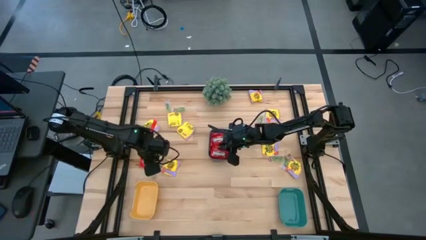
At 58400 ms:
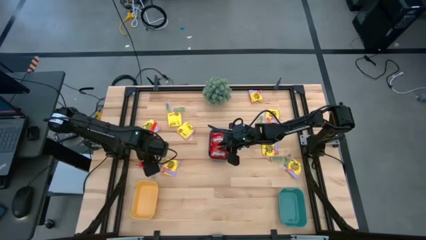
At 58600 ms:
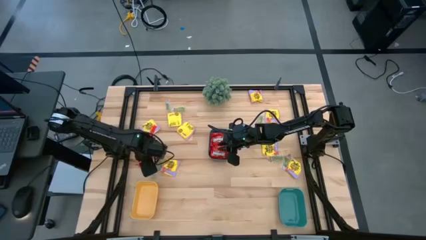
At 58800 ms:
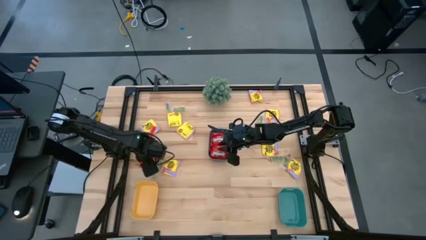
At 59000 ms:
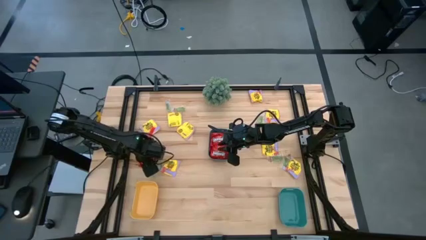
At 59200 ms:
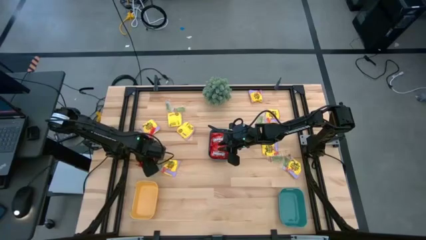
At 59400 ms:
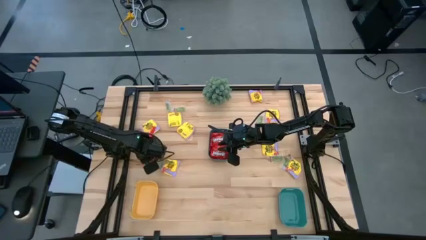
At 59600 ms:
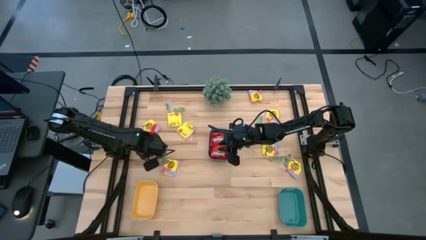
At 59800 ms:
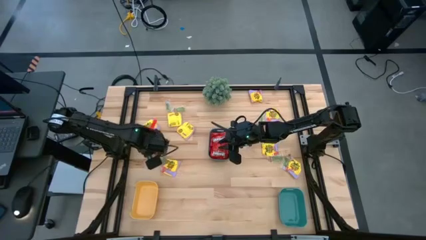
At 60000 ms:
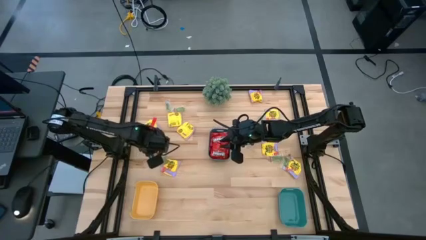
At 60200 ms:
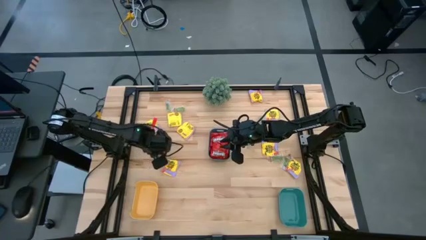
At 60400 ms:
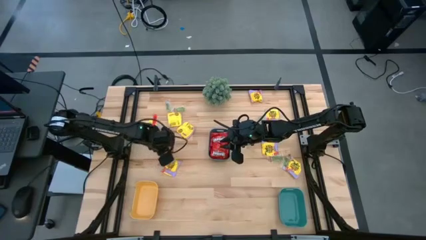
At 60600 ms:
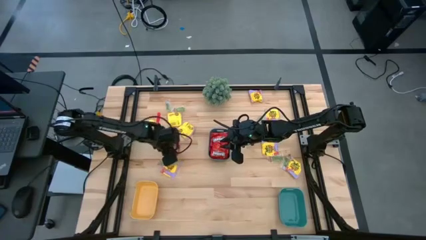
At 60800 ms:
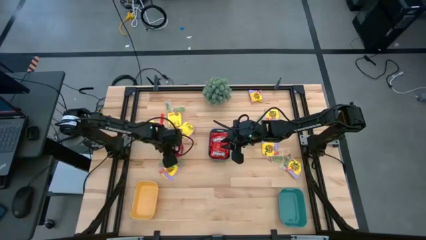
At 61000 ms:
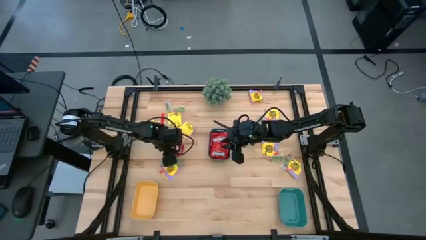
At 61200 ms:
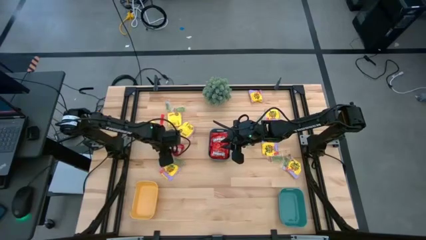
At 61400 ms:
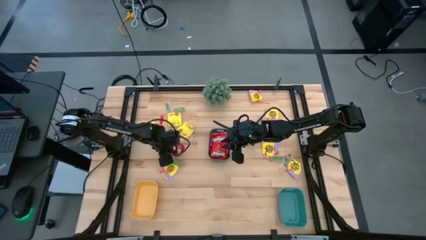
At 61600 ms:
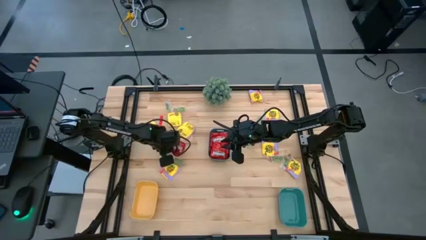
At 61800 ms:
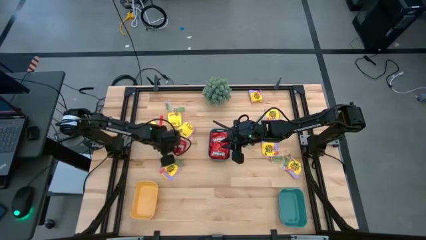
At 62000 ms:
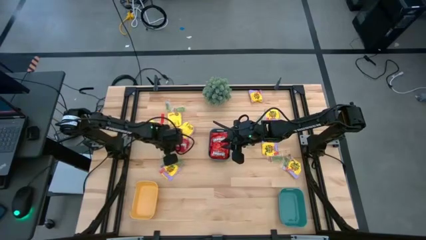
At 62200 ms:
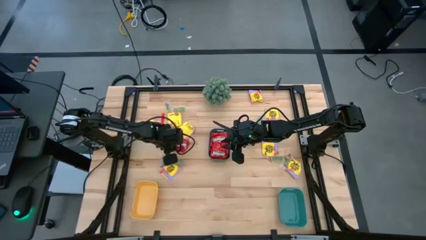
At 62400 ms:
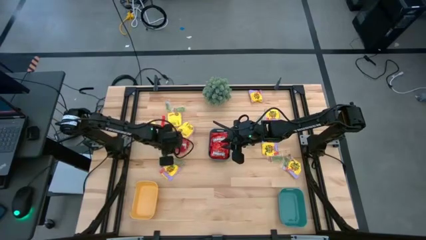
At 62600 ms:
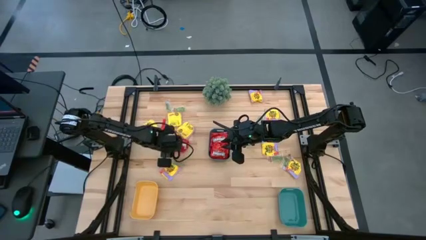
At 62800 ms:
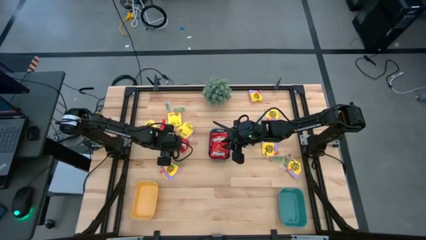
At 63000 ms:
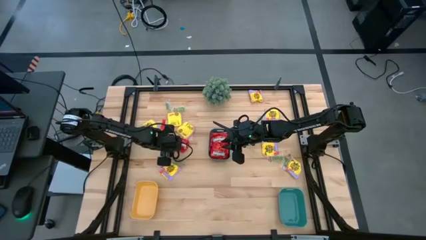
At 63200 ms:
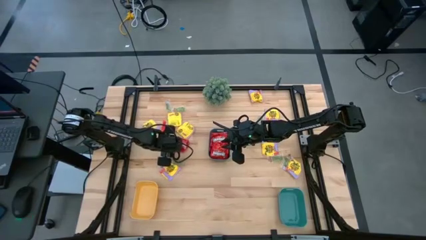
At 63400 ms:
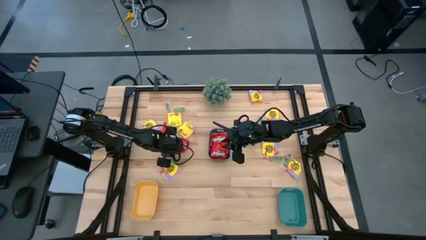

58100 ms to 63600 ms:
Task: Sort candy
Put the red candy pack into the blue bin

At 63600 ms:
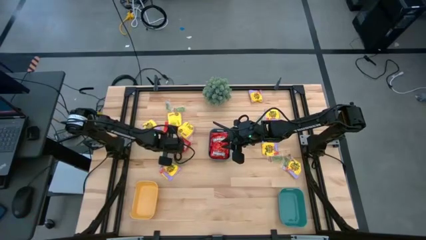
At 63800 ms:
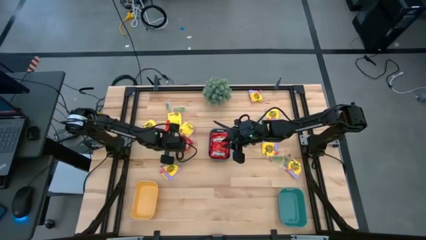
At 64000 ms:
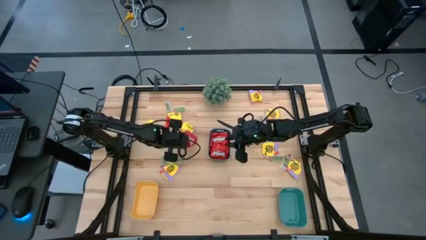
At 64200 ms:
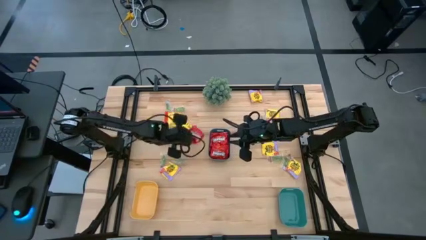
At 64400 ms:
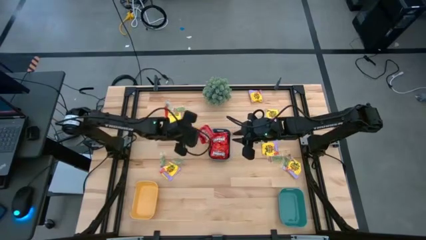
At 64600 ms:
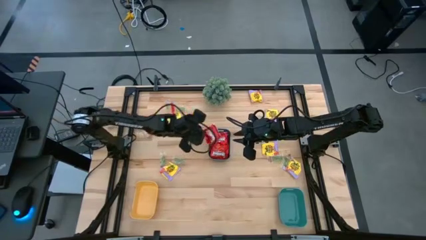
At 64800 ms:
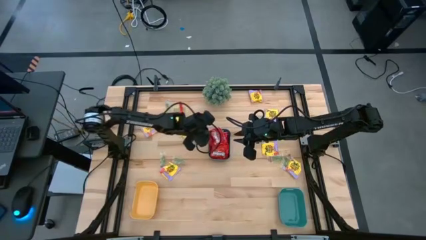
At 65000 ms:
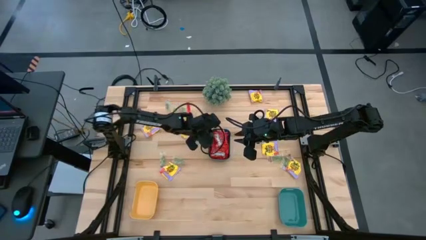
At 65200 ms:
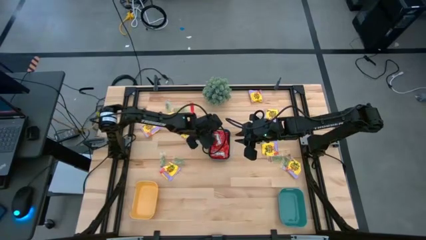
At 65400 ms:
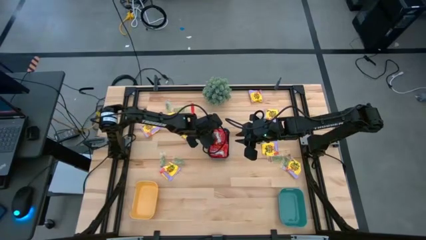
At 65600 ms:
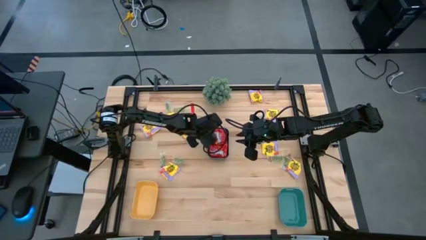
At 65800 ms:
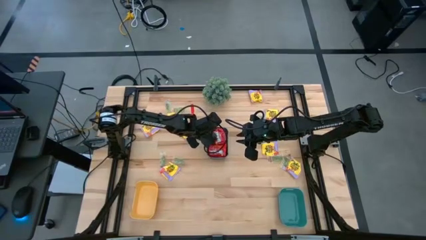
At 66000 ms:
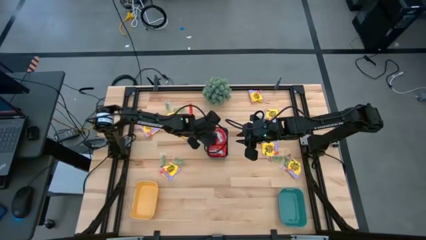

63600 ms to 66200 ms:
Put the red candy pack into the blue bin

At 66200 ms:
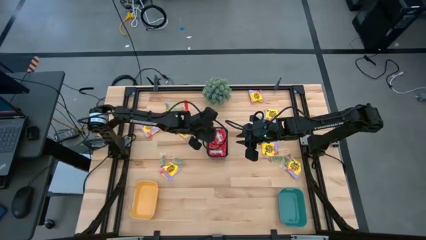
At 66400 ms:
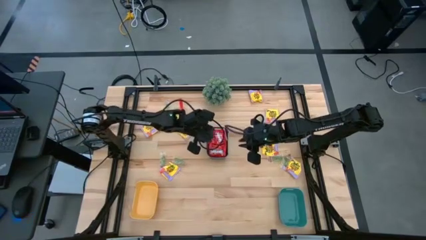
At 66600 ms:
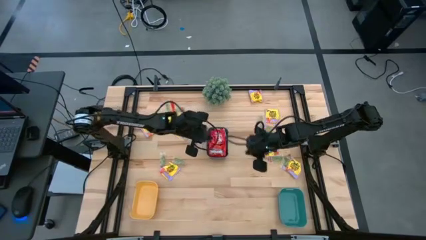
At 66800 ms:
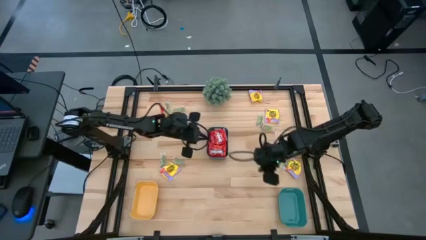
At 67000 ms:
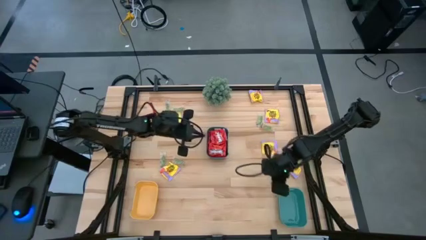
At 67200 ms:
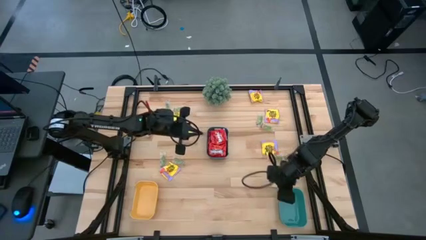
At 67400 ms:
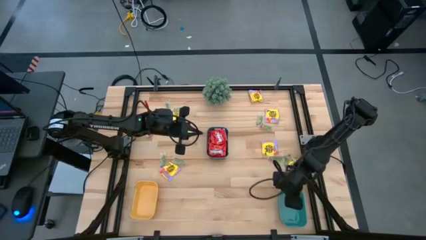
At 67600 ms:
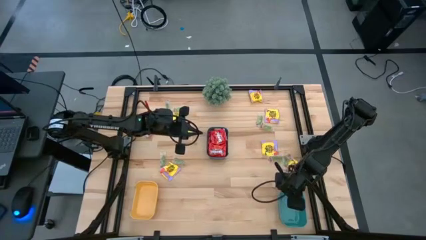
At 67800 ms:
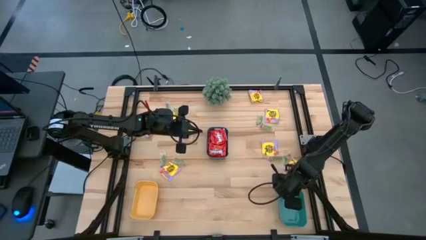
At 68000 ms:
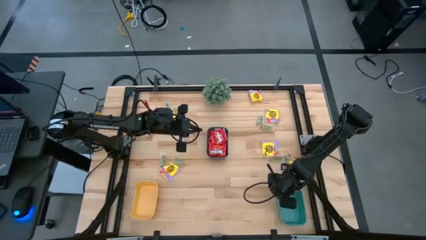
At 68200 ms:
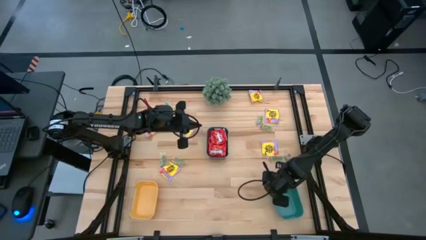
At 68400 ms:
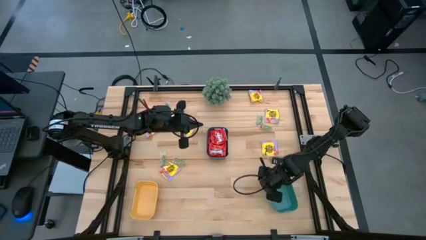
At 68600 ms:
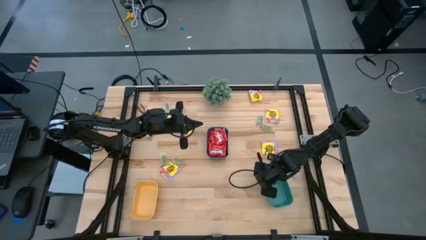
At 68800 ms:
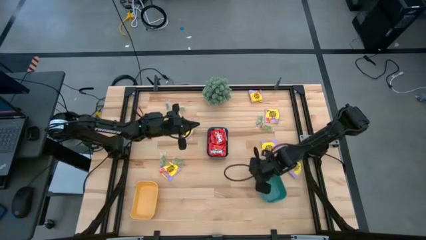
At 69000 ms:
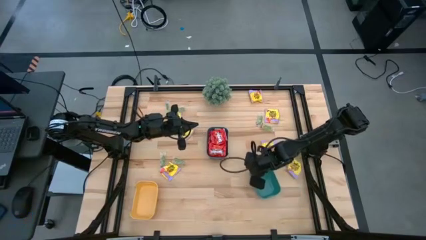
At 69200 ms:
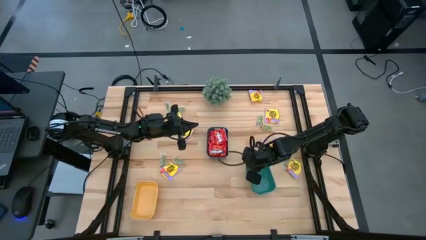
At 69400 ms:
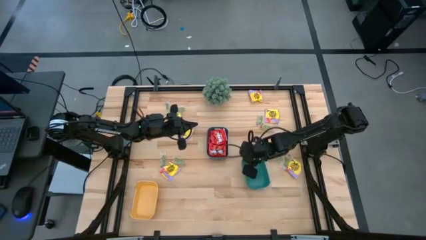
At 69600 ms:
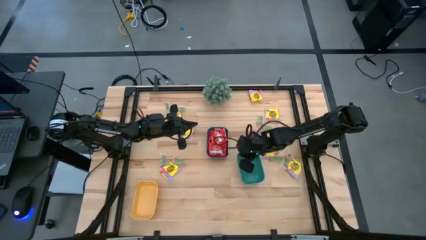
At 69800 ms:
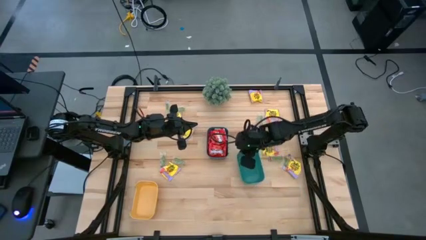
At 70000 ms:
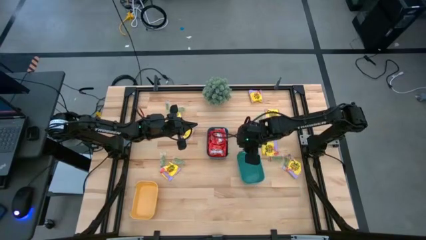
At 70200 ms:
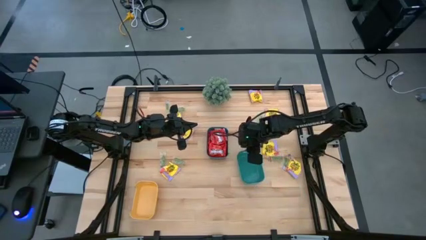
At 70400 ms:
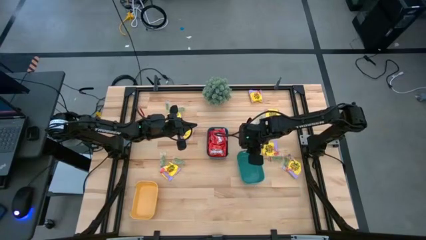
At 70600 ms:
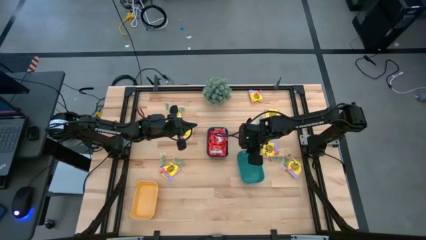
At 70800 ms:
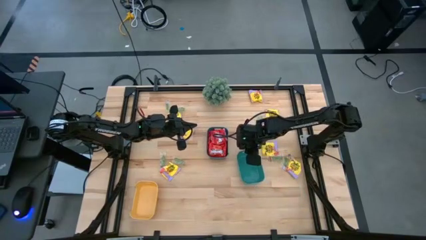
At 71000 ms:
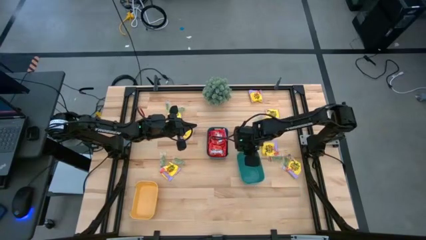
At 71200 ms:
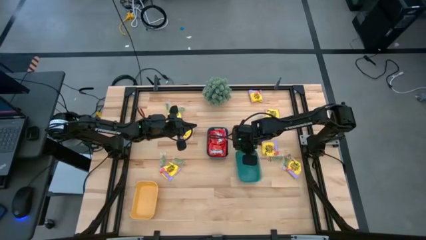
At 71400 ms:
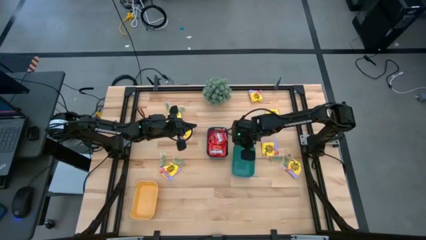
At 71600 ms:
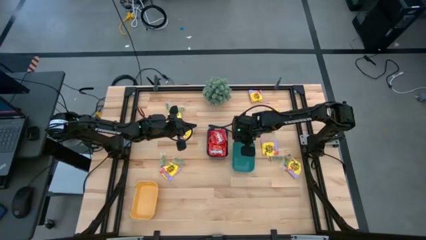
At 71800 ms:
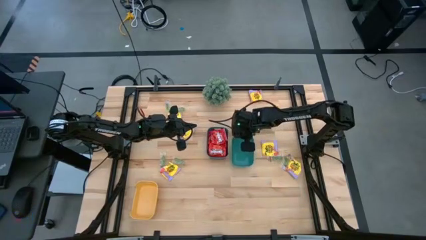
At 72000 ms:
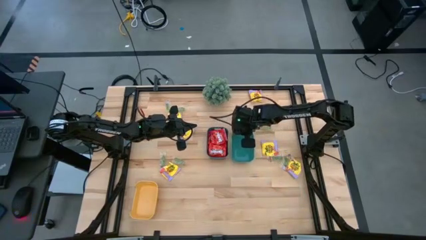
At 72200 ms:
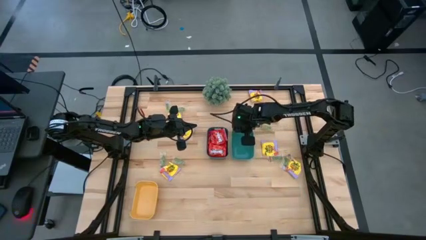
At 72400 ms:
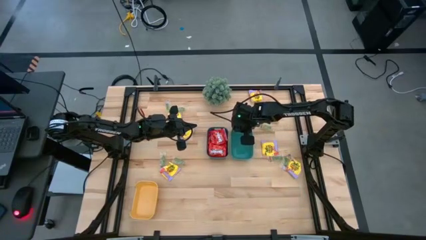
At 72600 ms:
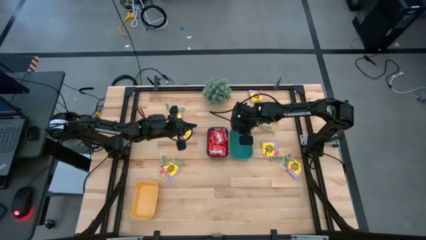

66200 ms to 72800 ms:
Move the green bin to the right side of the blue bin

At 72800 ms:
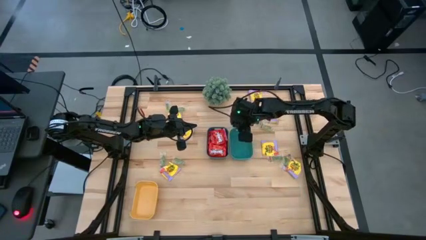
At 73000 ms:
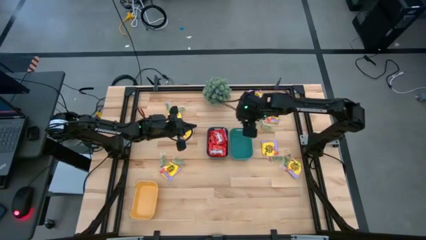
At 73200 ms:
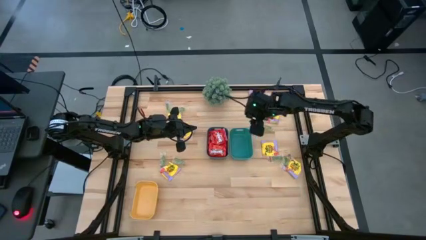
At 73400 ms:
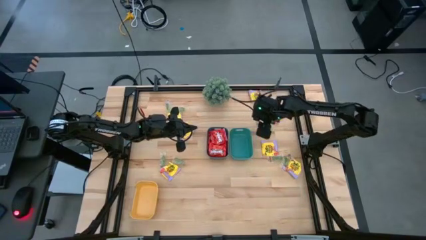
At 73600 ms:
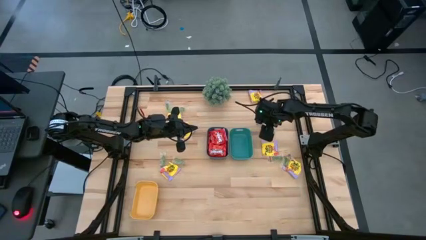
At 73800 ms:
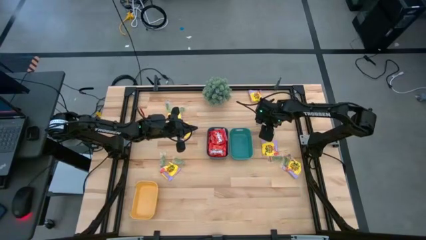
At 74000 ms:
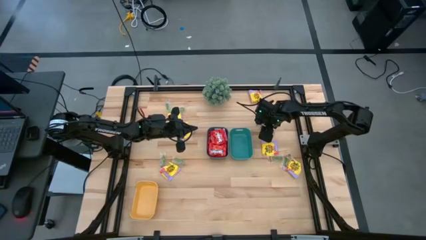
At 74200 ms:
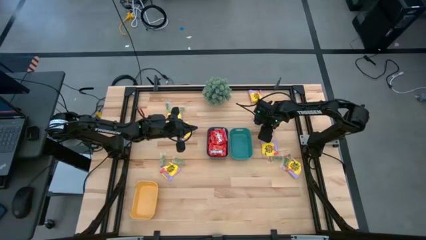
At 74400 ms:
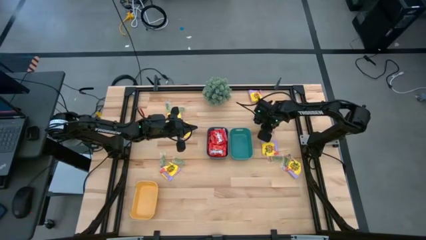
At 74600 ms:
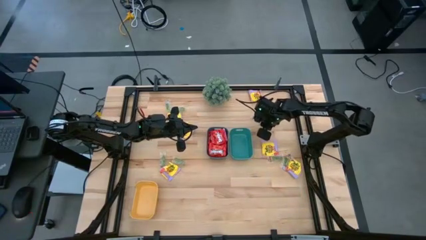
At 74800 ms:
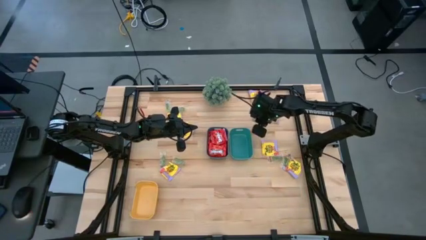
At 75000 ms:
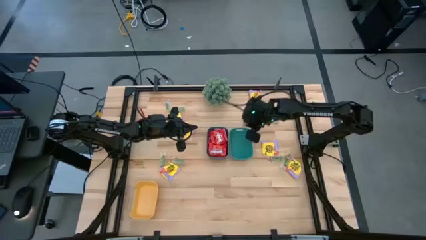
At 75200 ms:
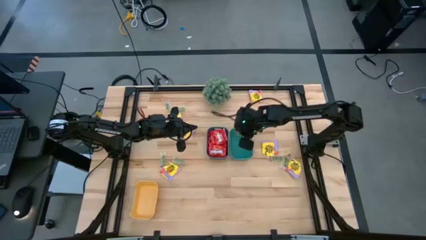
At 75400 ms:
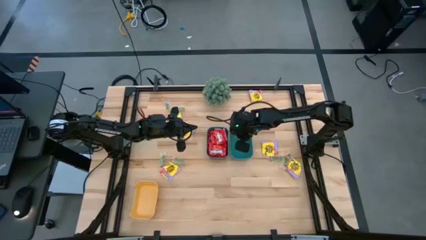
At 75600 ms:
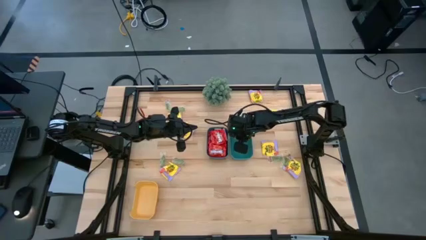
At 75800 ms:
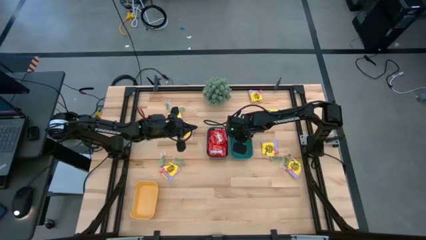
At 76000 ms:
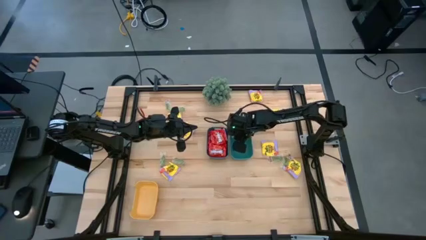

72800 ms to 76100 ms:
Put the green gummy into the green bin
